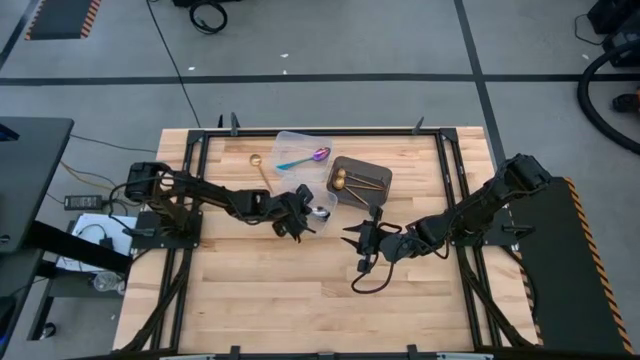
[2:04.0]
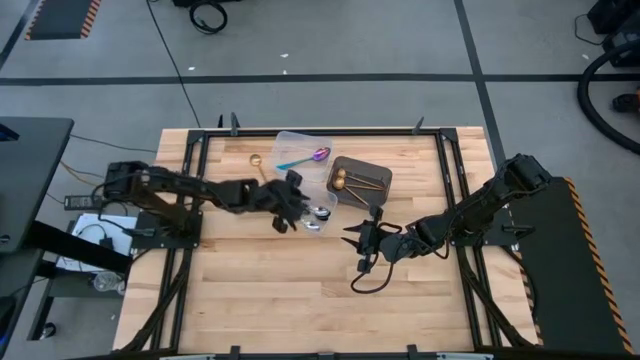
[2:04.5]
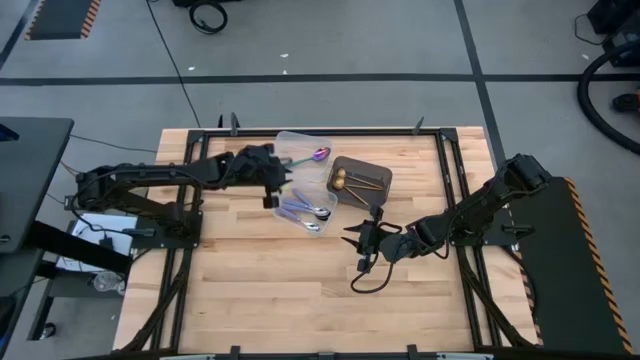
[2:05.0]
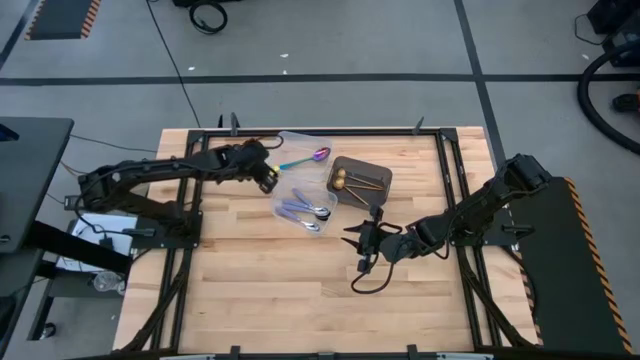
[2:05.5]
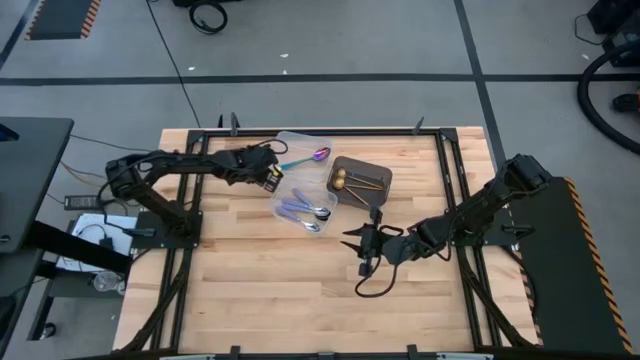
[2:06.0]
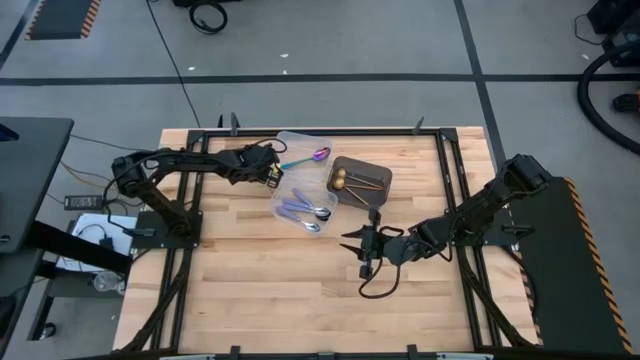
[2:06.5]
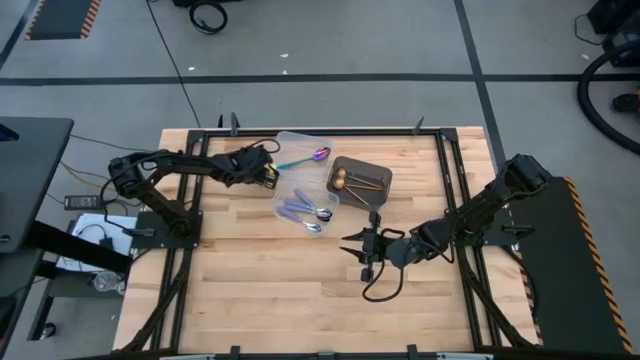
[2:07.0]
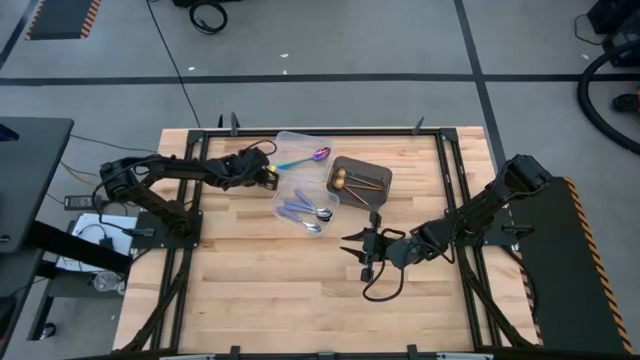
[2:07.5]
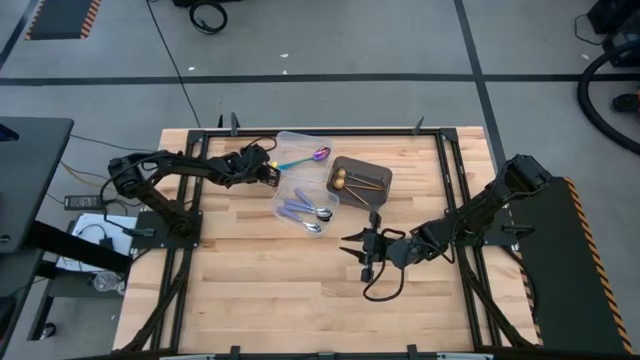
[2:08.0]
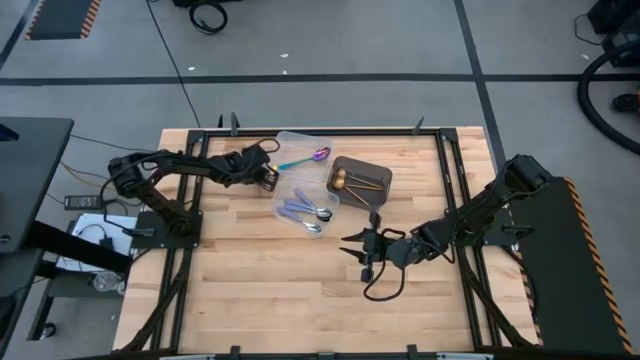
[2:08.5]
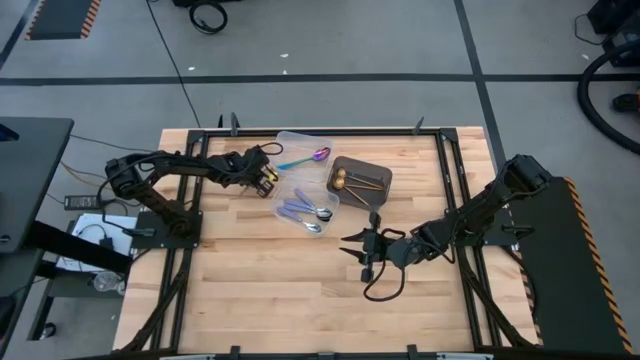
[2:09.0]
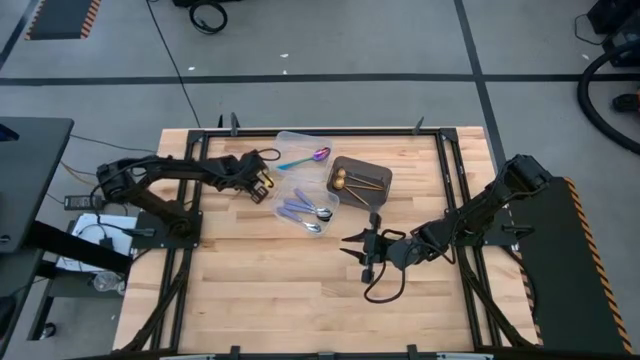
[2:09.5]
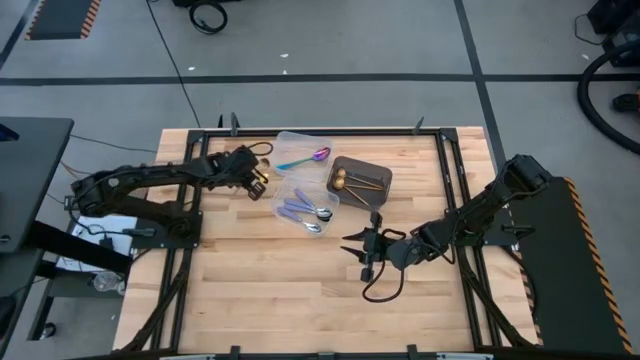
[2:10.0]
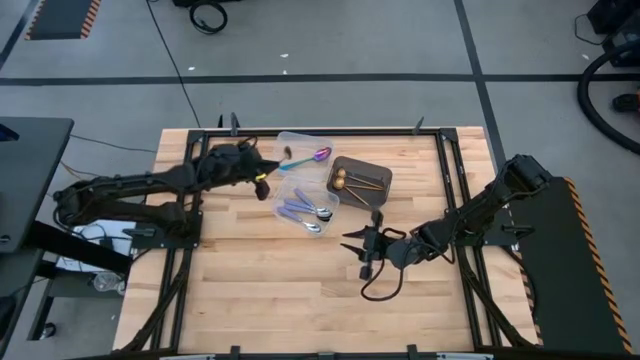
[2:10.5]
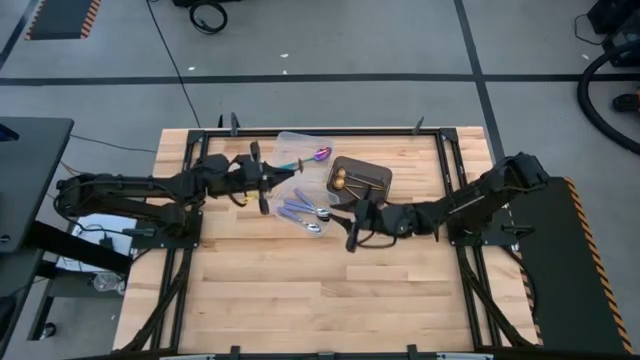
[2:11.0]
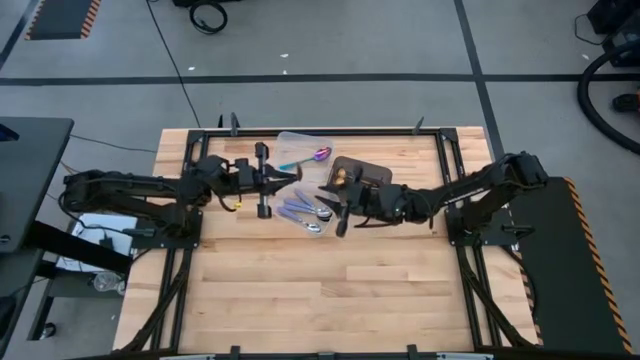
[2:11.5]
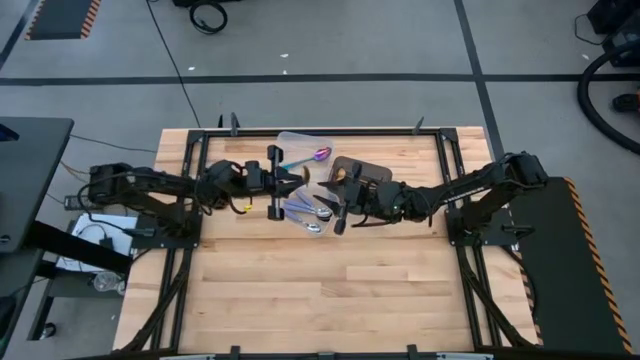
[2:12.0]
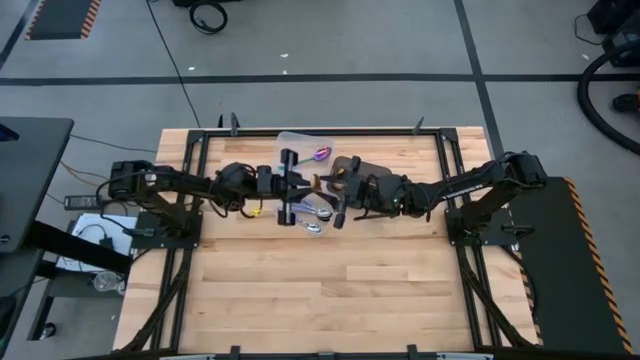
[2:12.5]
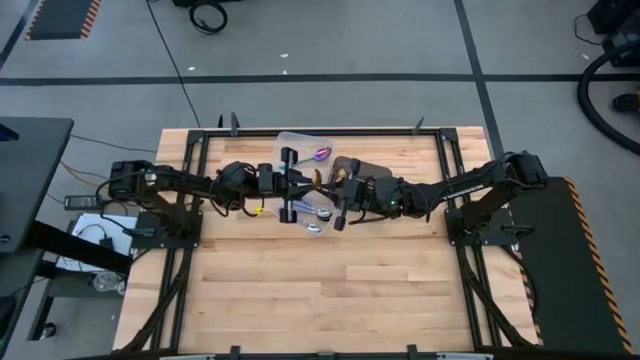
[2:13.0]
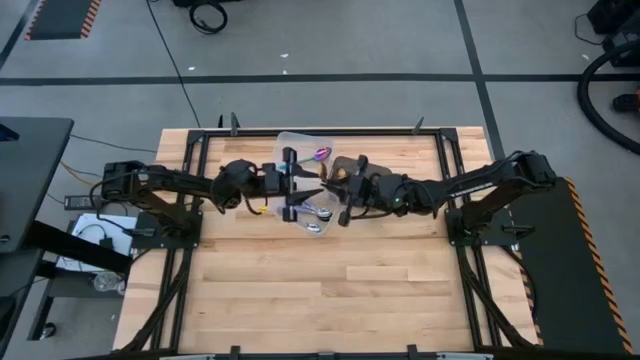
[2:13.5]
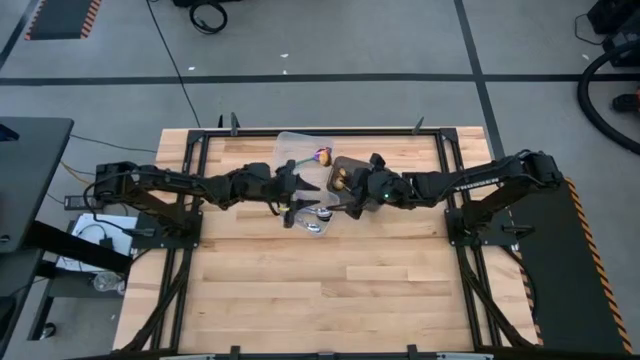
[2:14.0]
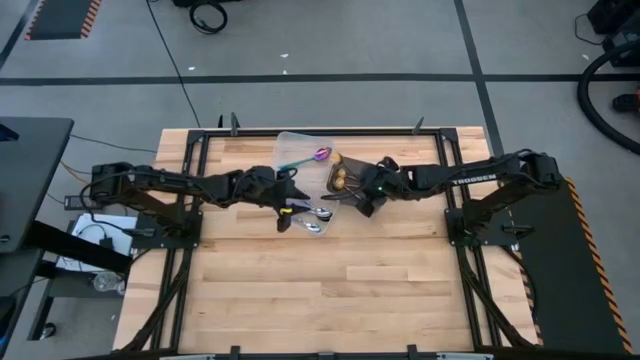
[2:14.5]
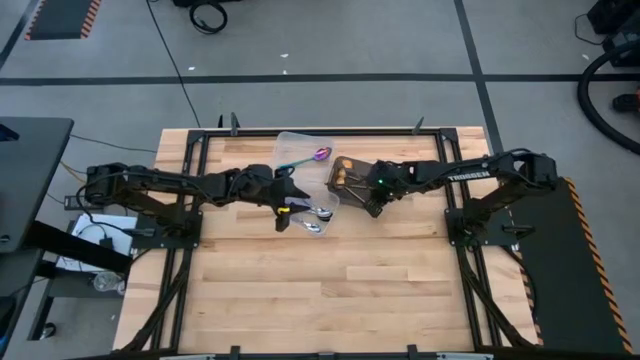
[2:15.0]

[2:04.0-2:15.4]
Task: Sort silverware by color (type)
Put the gold spoon into the black bin

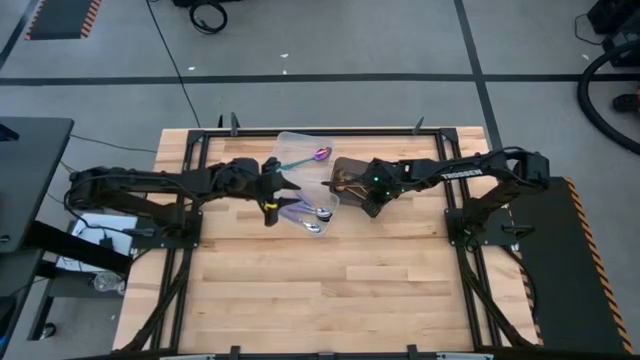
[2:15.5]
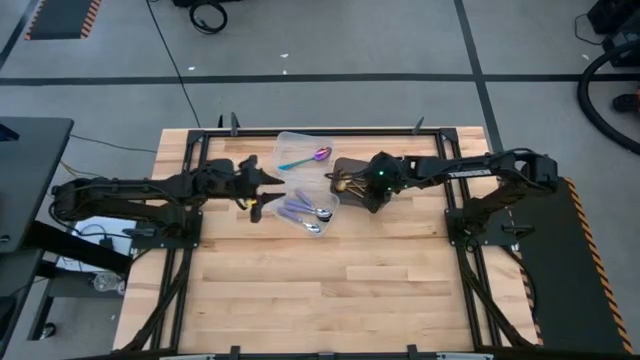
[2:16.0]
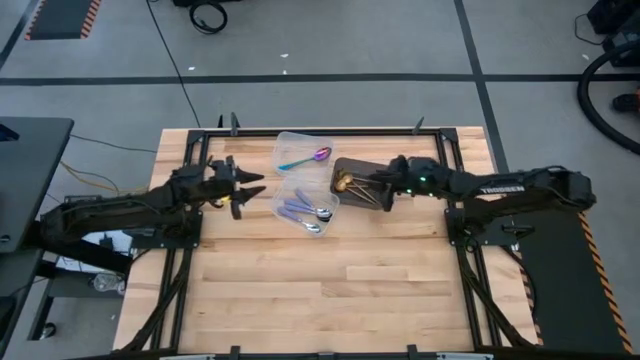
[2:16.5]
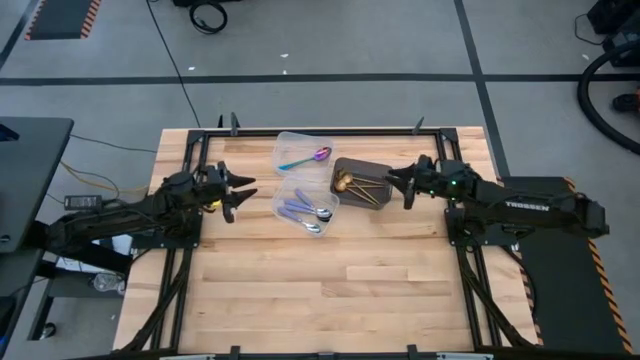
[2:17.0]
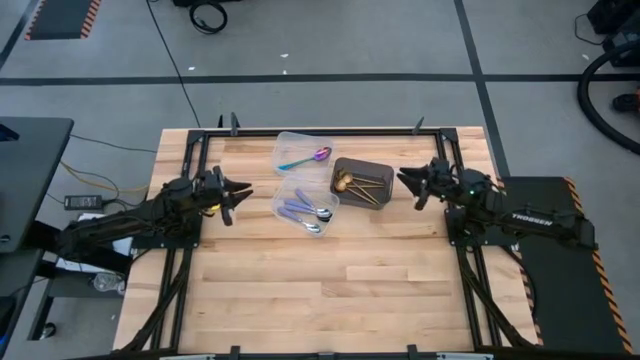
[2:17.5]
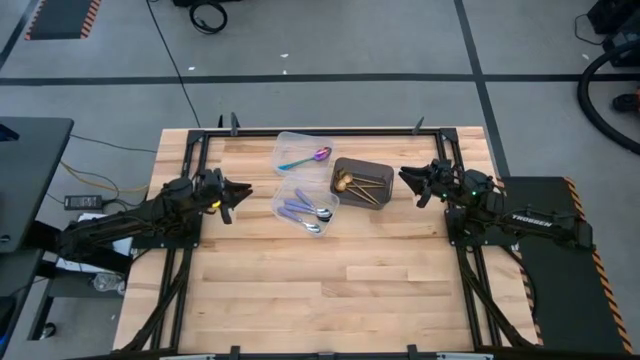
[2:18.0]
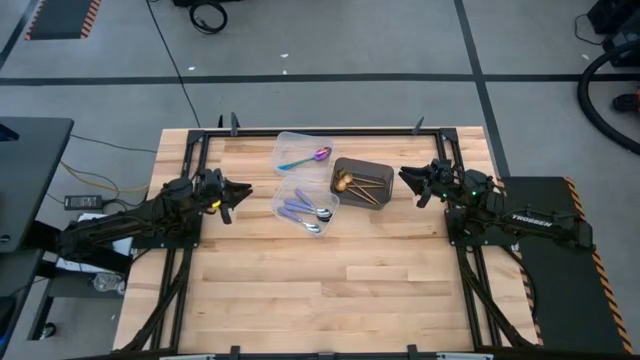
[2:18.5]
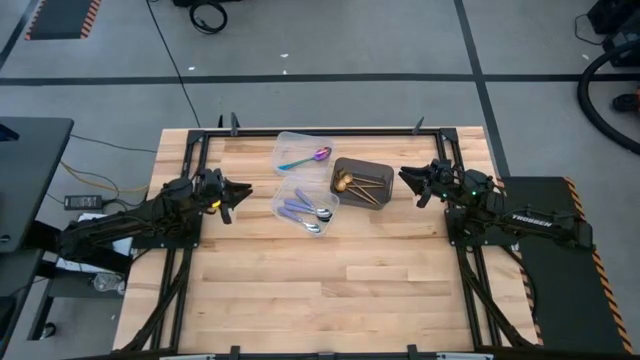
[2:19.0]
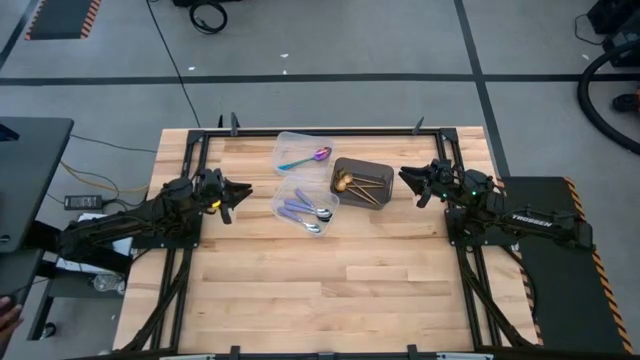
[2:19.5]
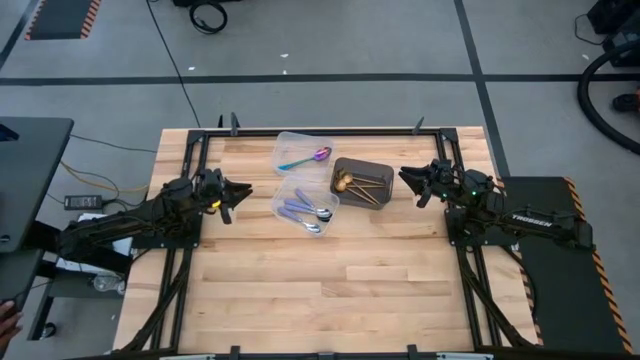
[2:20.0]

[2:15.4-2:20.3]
Return to Home Position

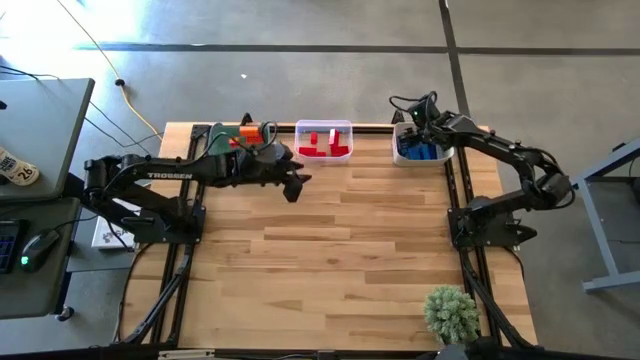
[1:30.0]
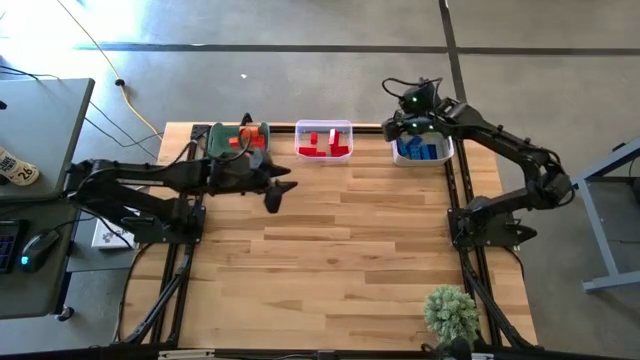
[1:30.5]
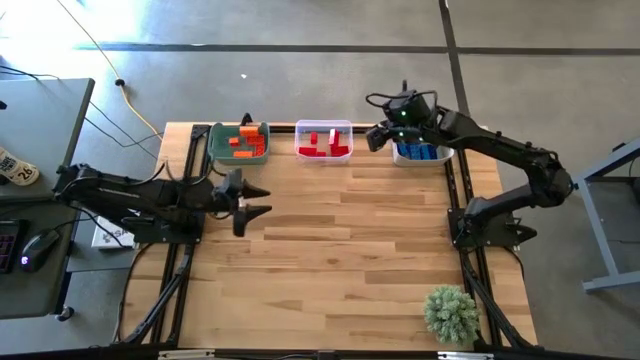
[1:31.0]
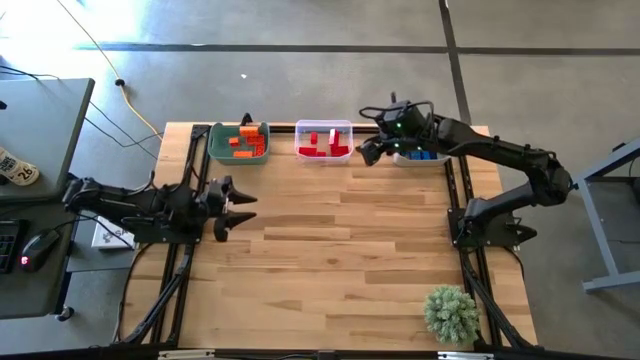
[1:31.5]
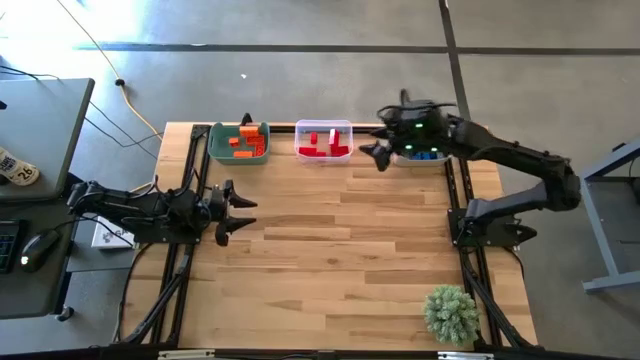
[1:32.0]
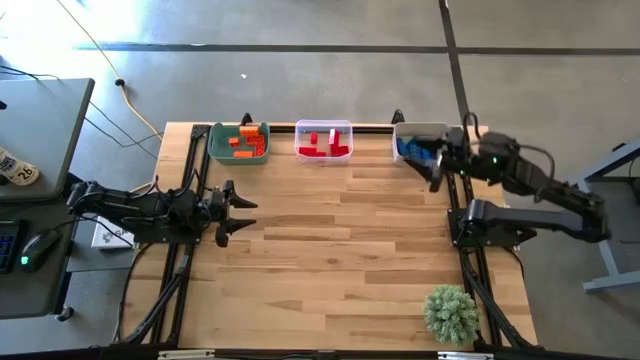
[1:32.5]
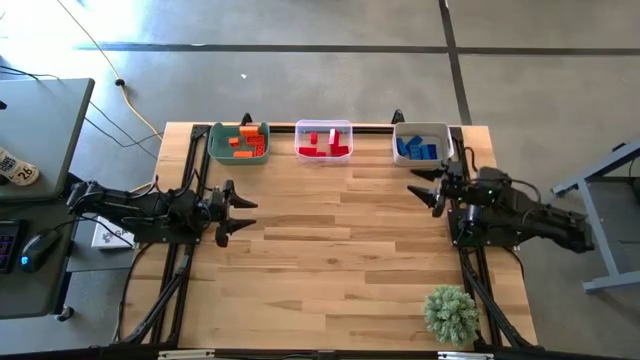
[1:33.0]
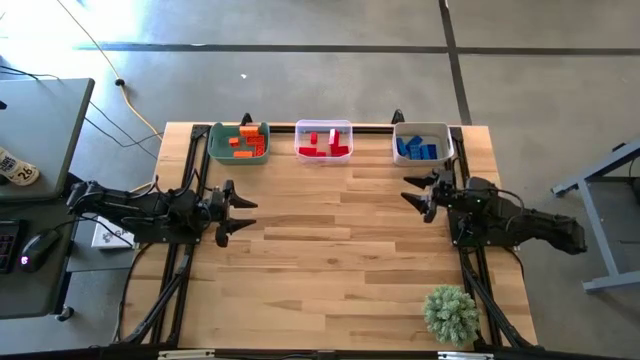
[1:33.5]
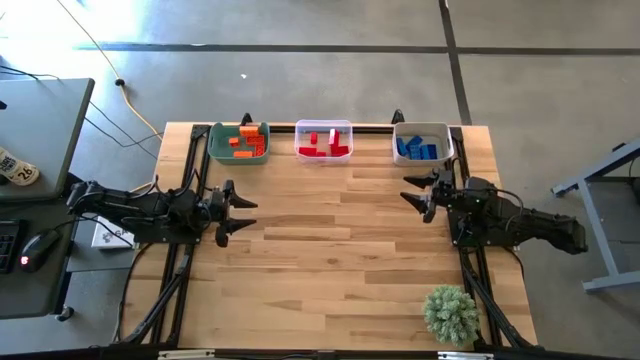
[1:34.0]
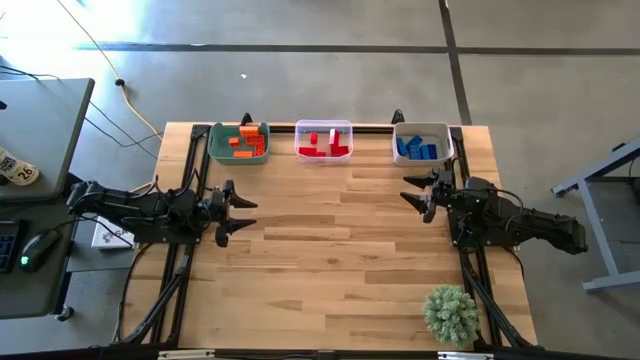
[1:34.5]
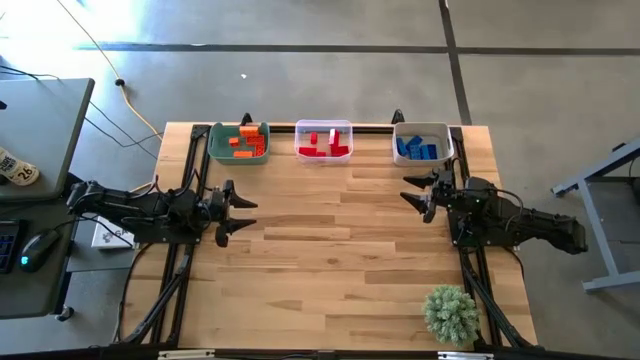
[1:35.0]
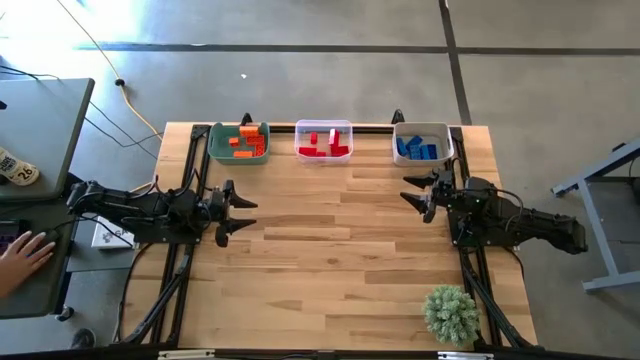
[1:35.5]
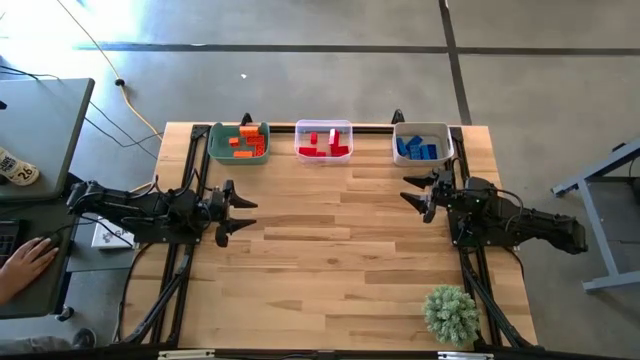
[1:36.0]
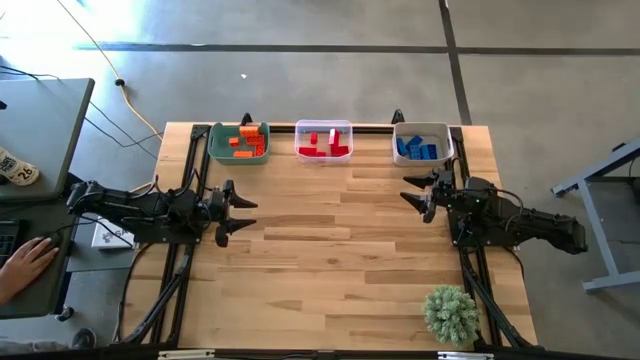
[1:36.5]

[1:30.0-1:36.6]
Task: Sort & place blocks by color
Return to Home Position
